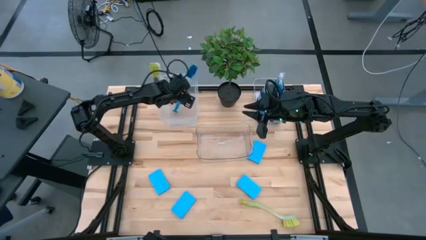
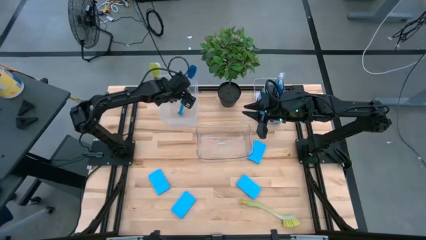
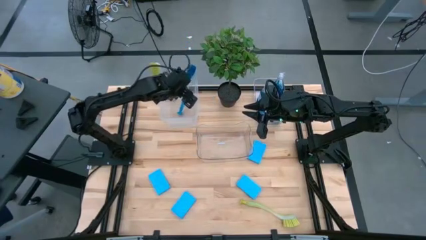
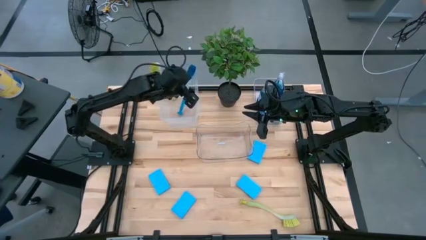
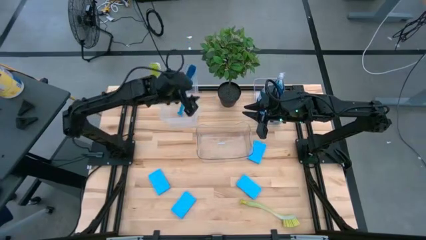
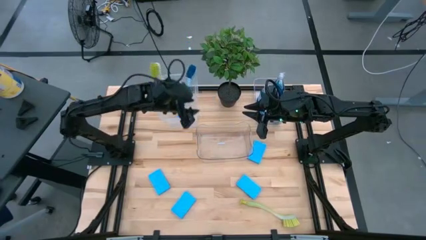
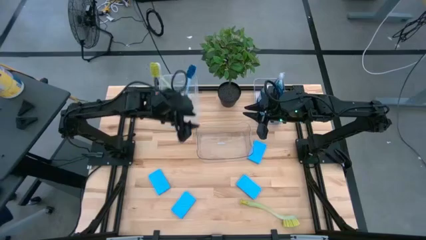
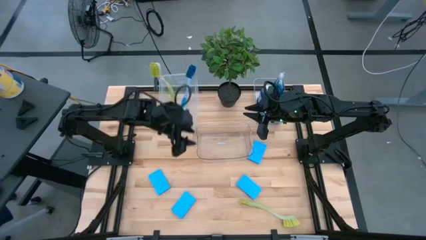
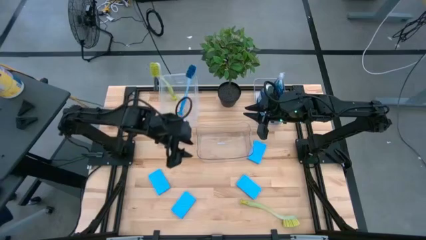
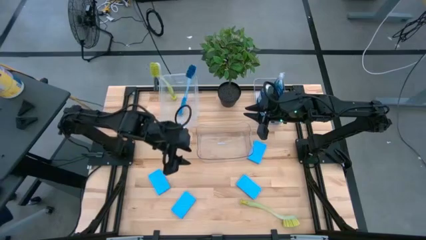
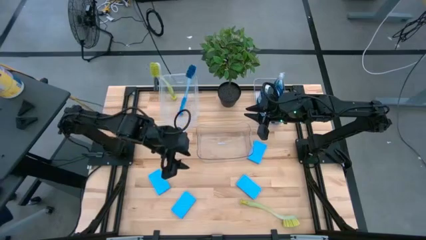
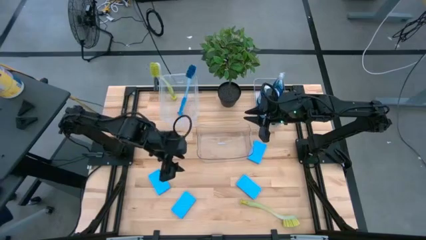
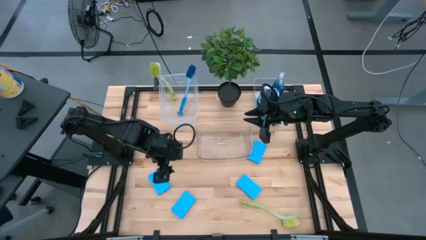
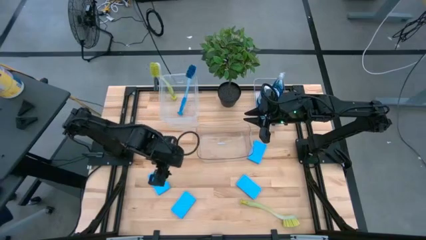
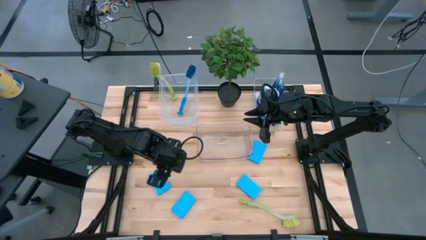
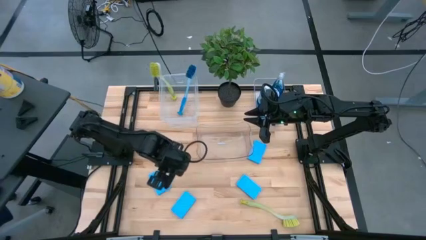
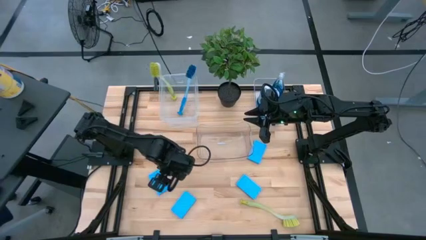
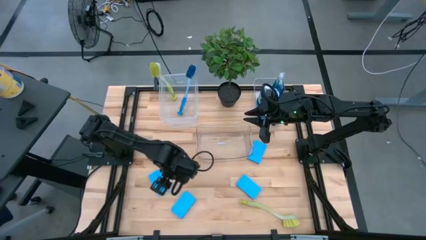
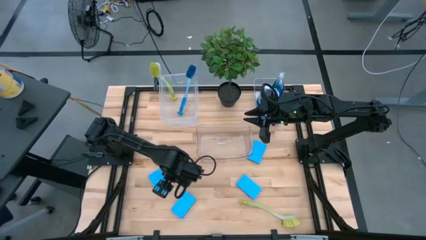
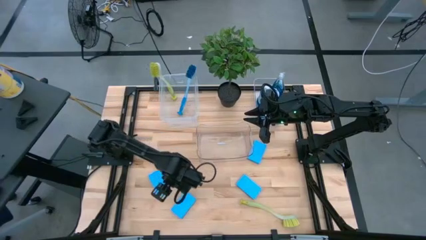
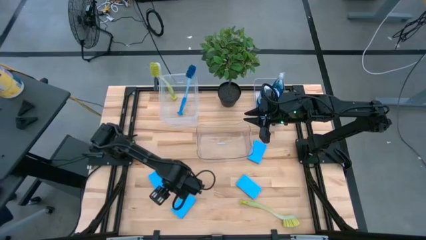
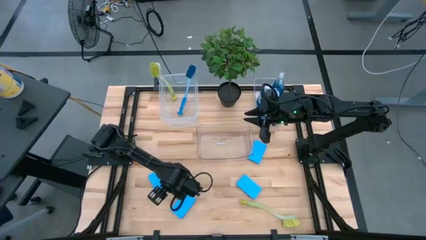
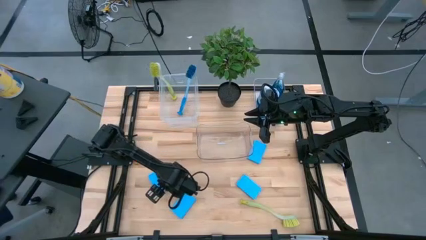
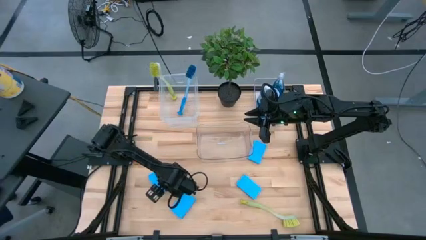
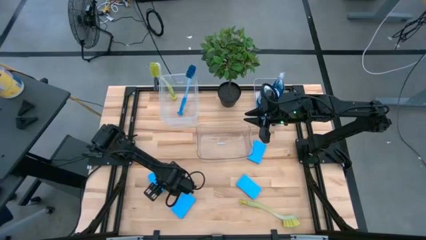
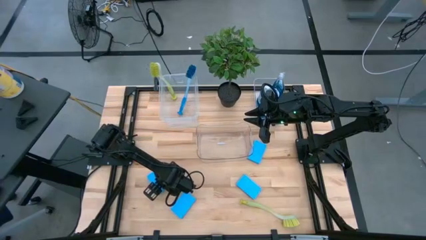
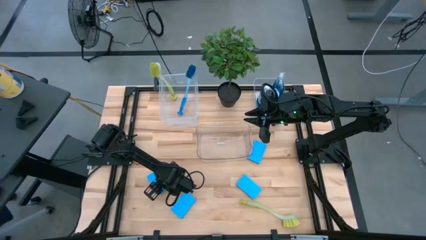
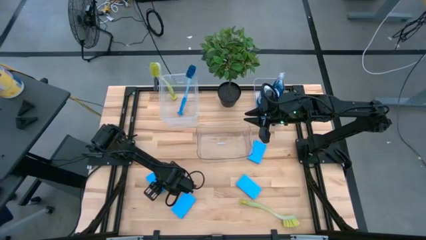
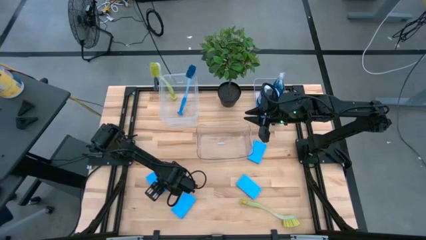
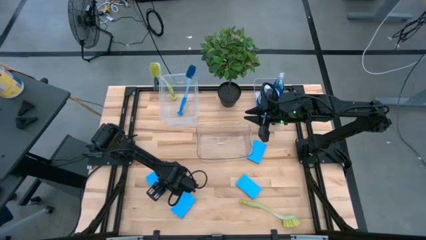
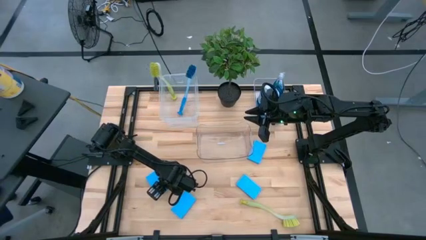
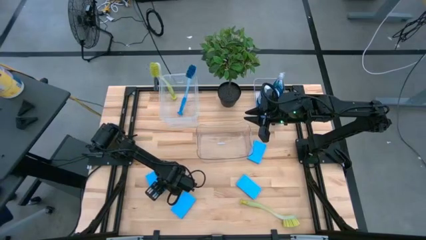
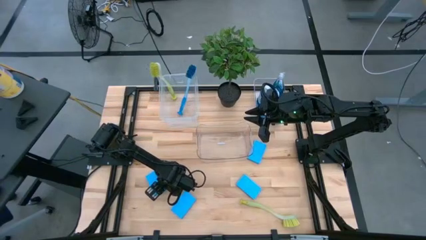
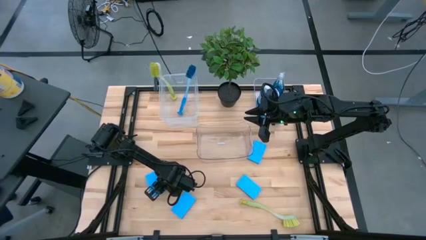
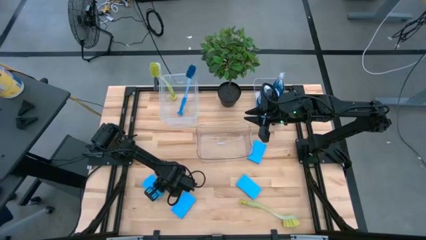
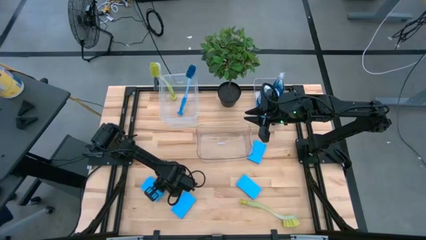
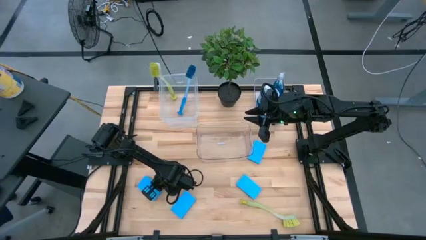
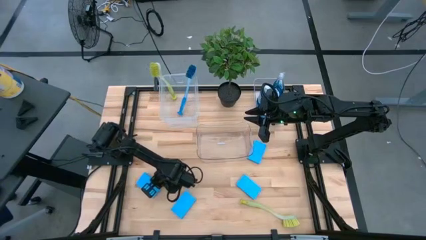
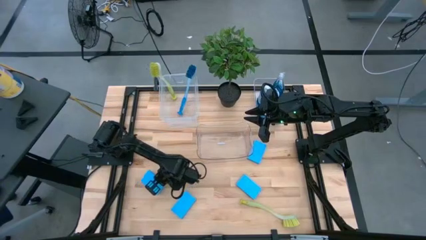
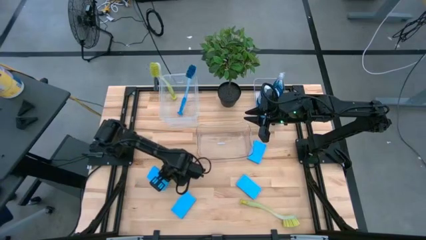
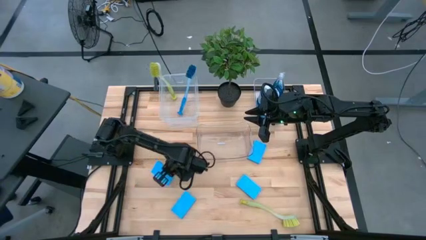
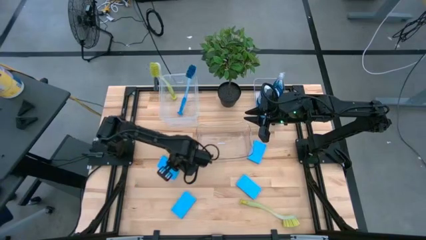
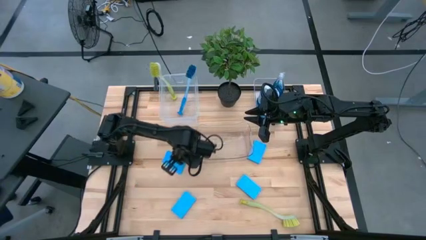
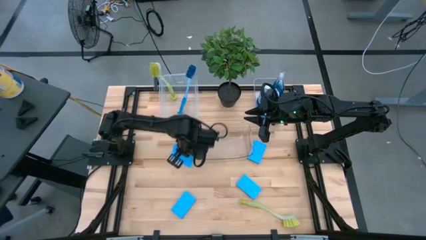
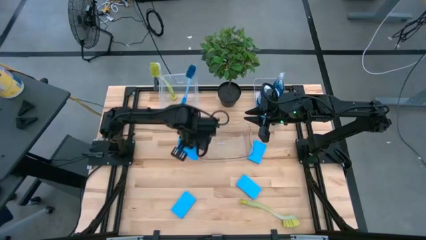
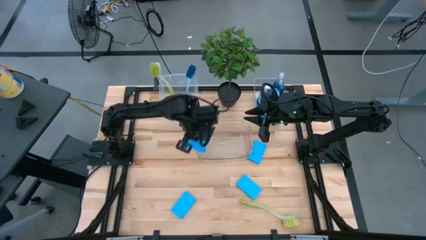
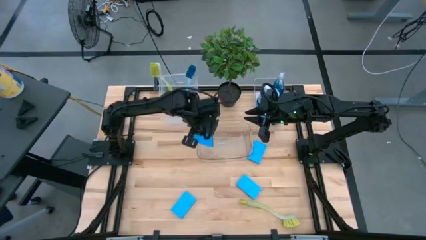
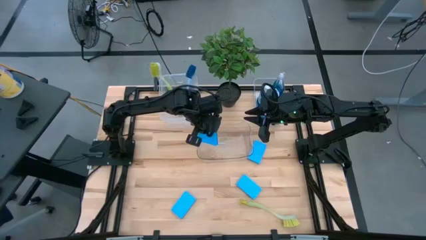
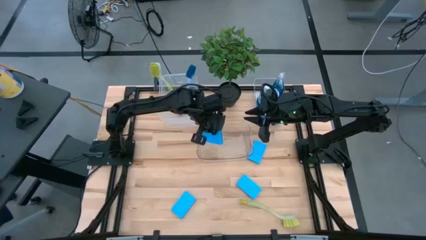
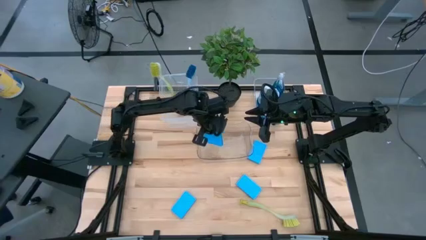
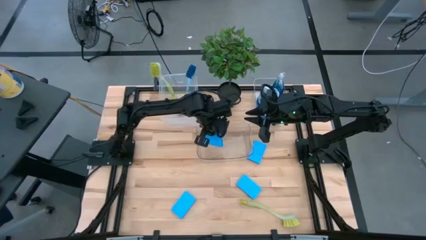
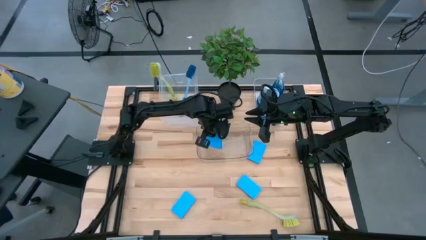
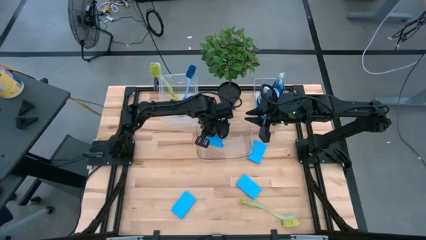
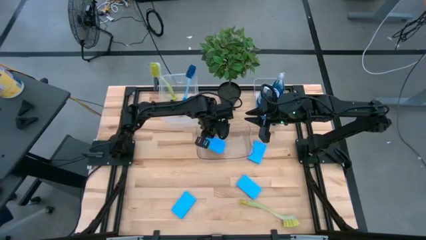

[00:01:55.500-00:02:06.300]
Task: Pick & Place Kitchen Sink Supplies
Put the blue sponge into the bottom transparent bin

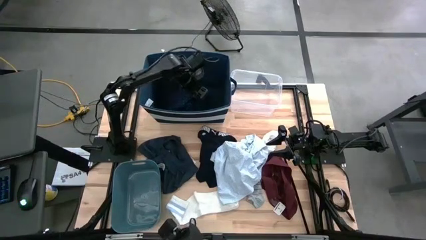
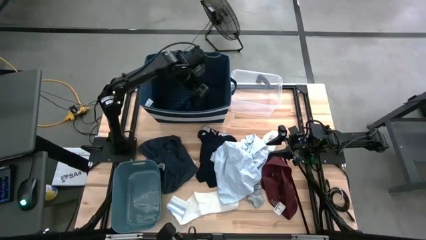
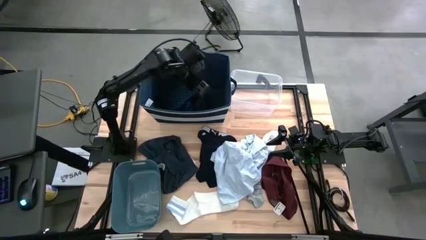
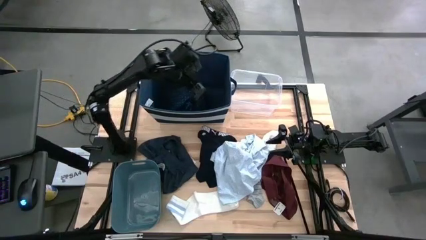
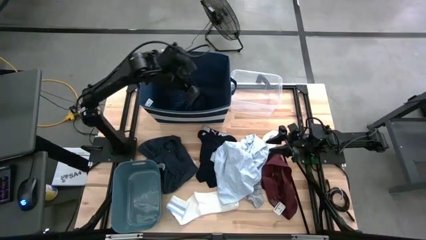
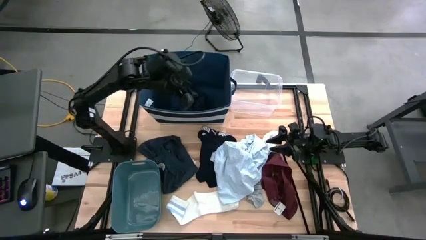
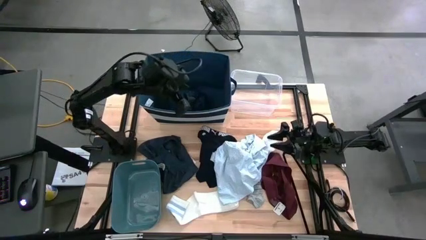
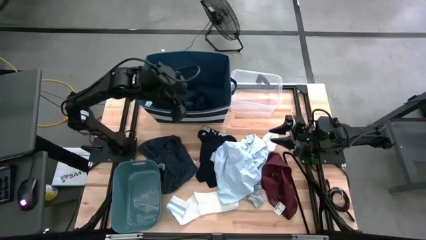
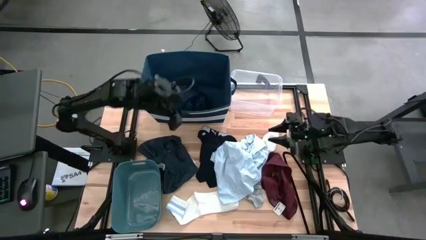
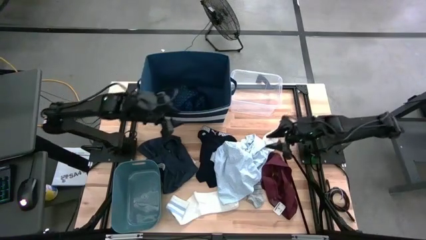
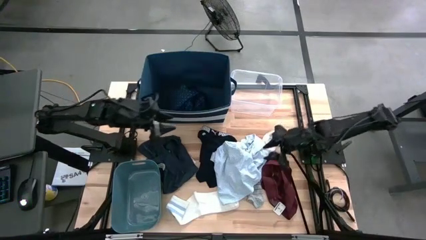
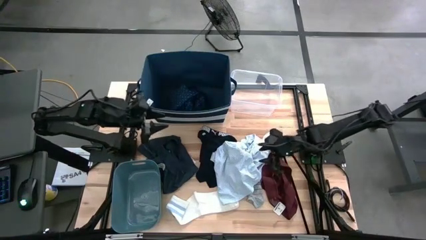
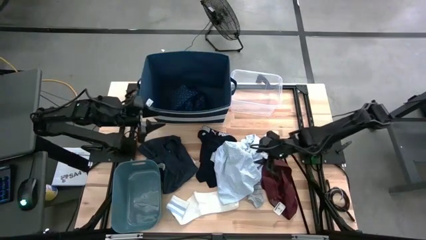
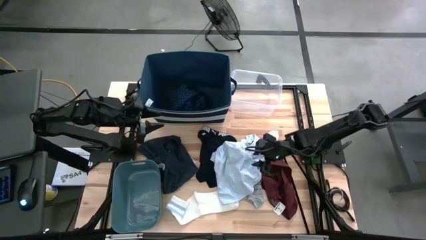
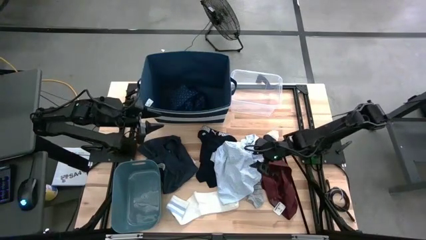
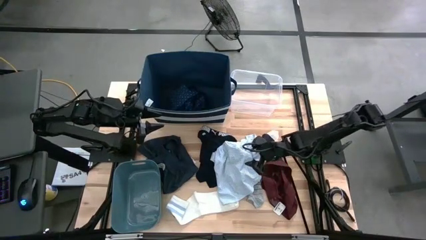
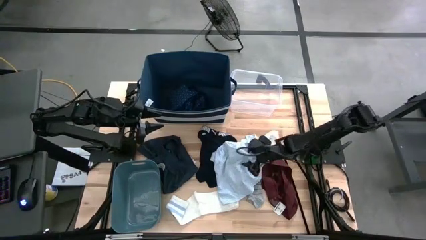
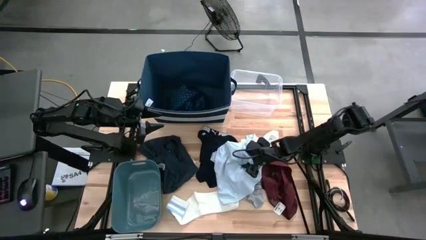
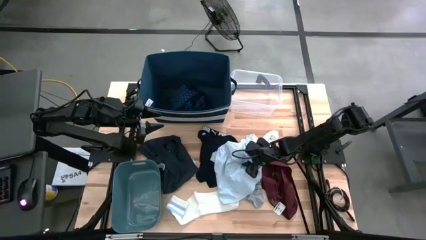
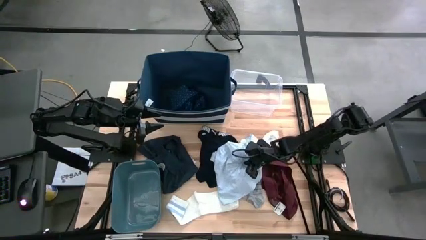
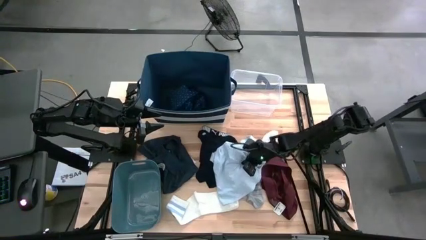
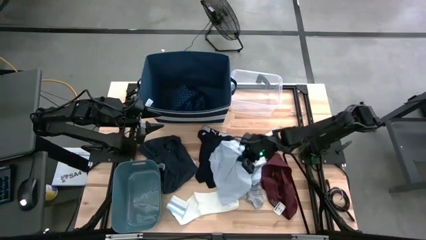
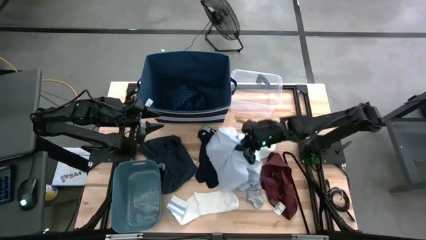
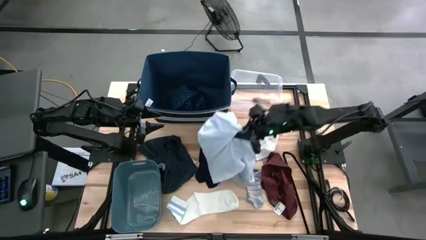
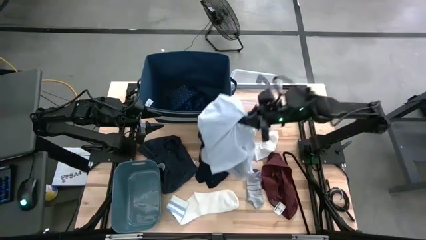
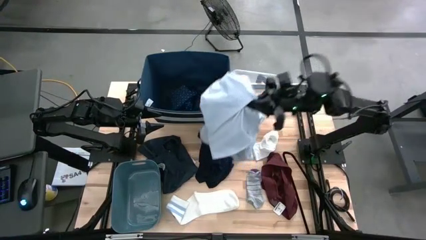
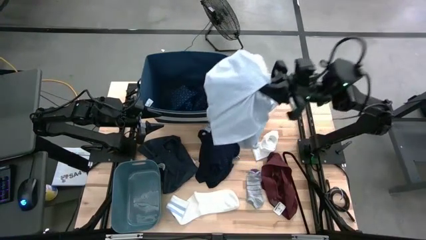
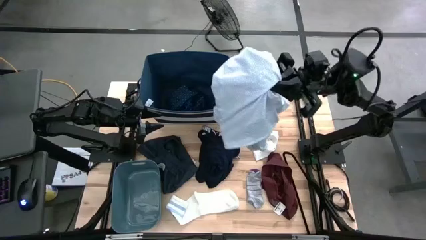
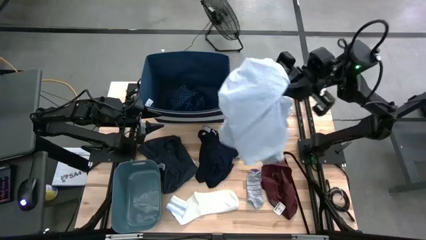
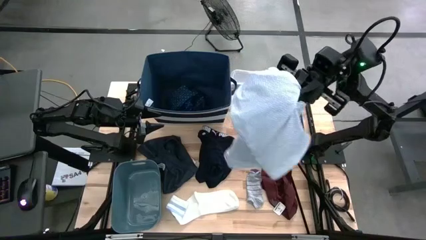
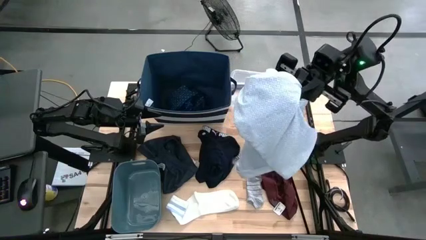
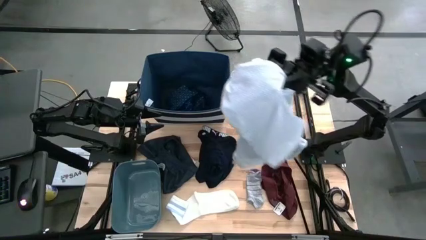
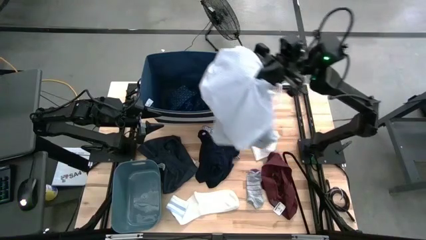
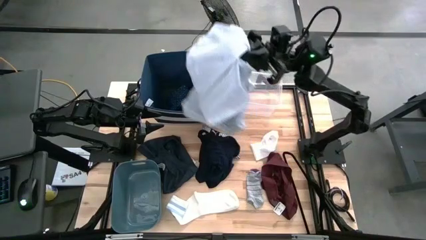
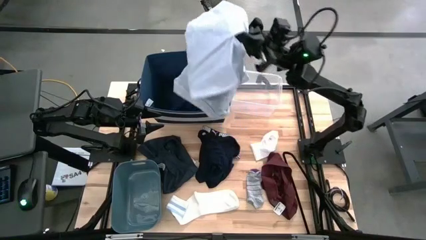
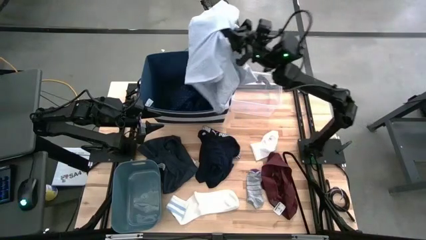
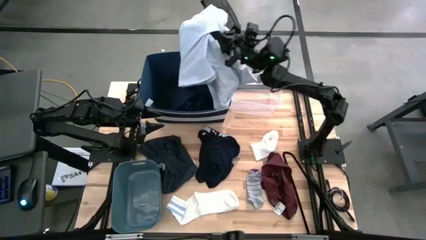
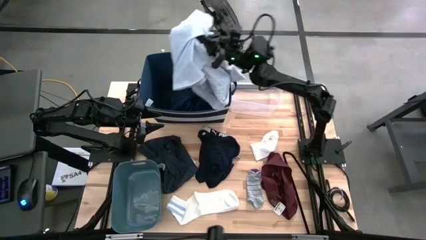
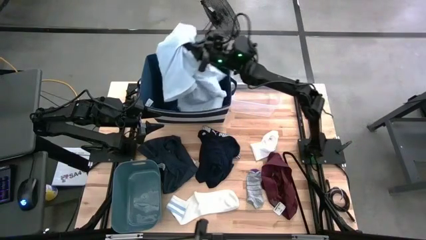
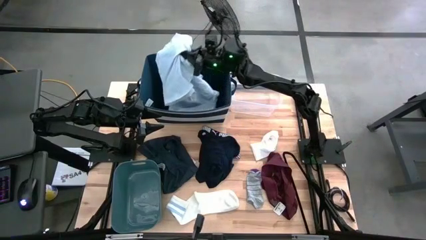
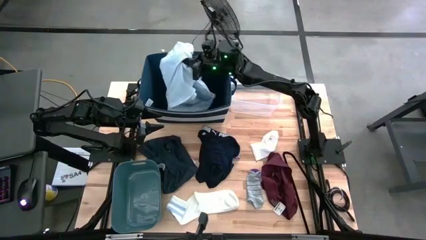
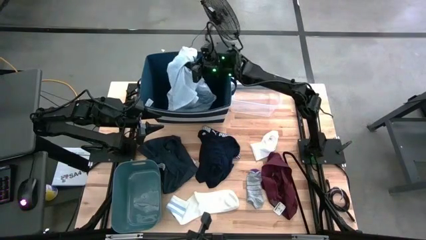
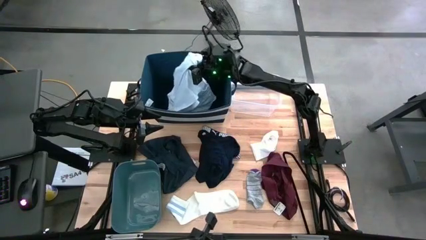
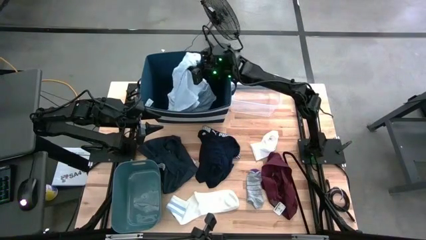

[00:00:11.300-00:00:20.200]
Task: Pick & Place Cloths
Put the white shirt into the blue bin
